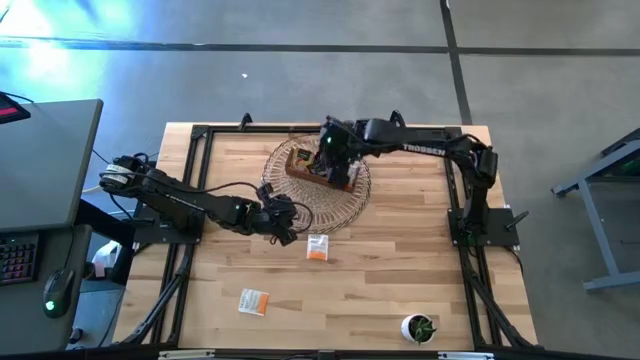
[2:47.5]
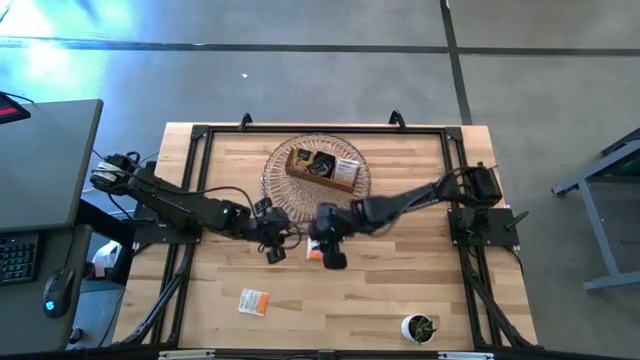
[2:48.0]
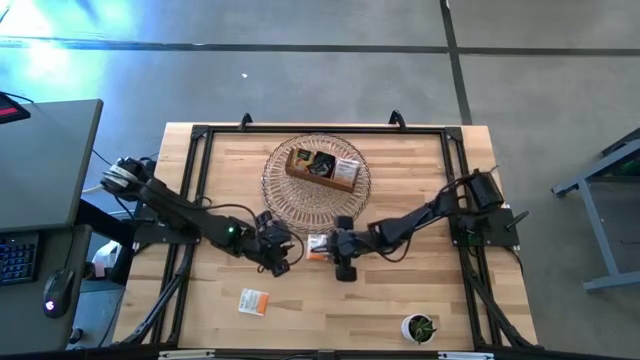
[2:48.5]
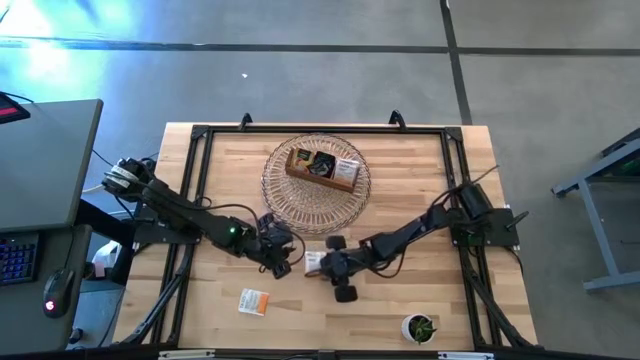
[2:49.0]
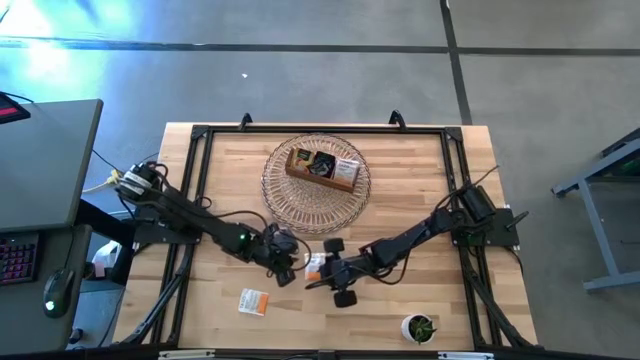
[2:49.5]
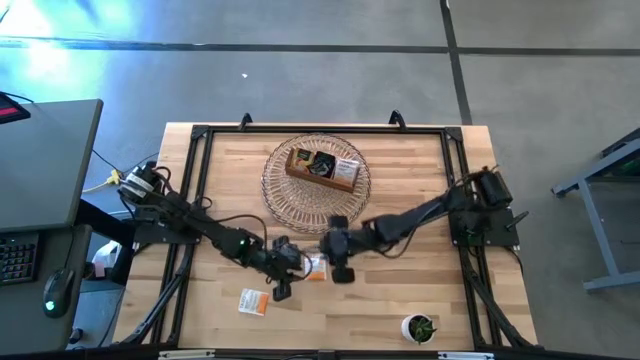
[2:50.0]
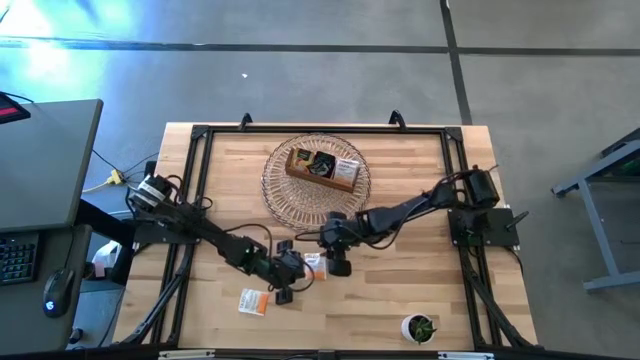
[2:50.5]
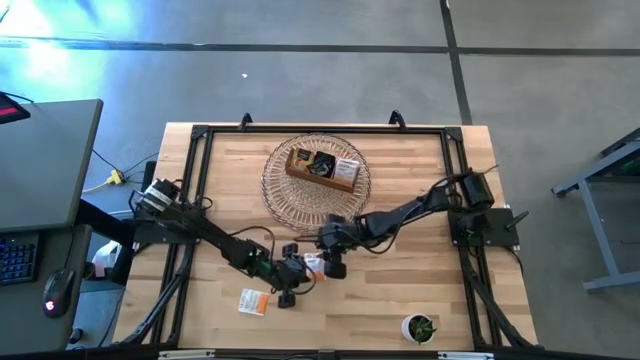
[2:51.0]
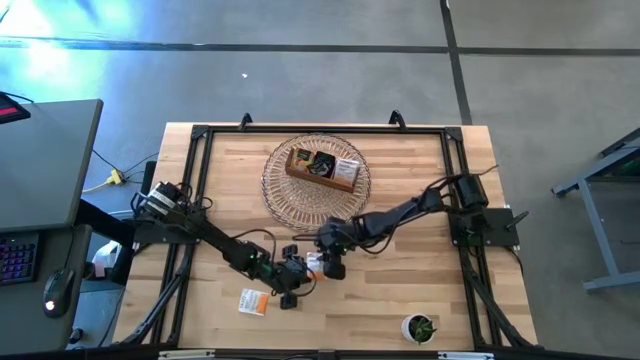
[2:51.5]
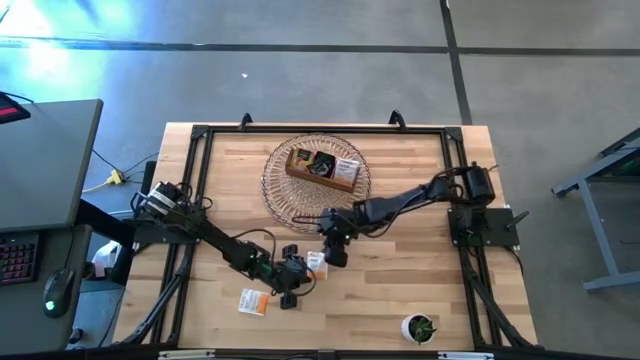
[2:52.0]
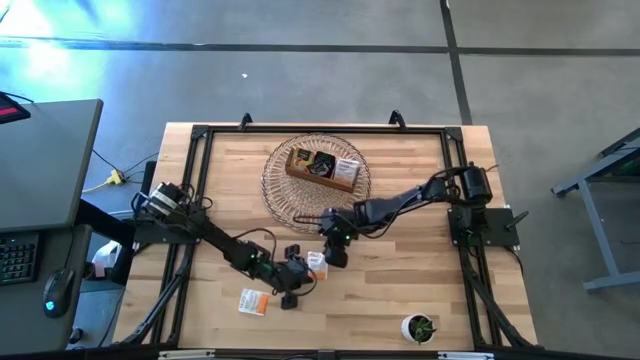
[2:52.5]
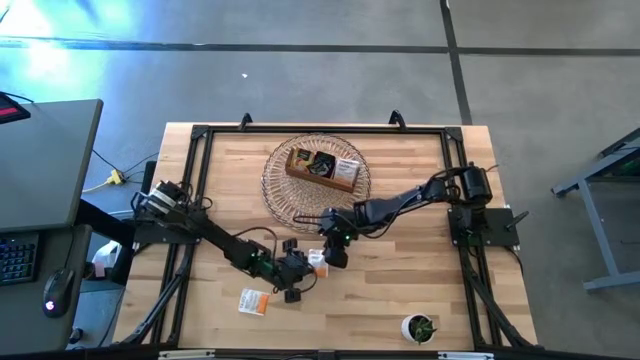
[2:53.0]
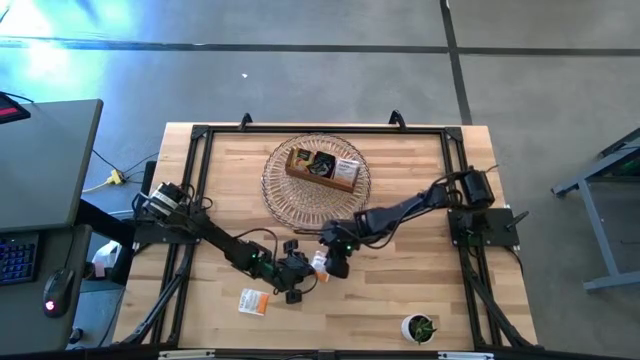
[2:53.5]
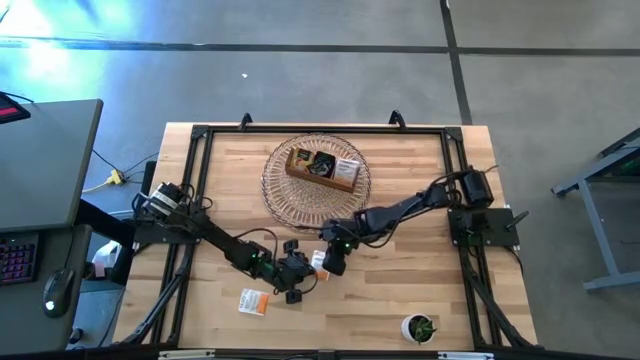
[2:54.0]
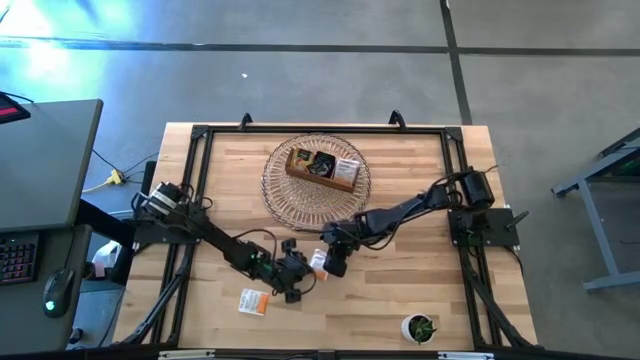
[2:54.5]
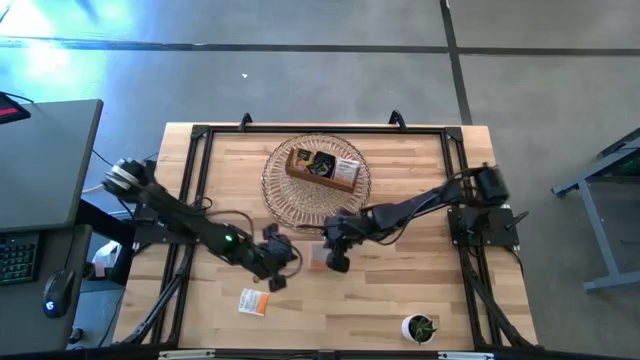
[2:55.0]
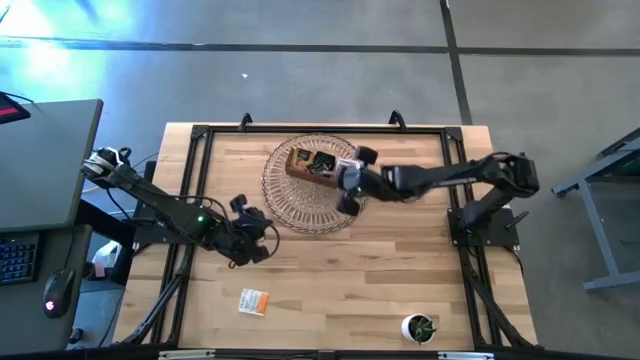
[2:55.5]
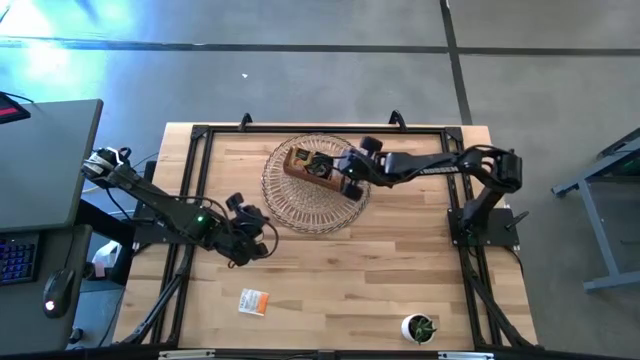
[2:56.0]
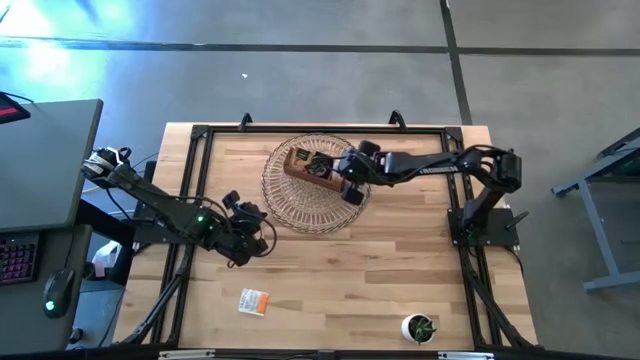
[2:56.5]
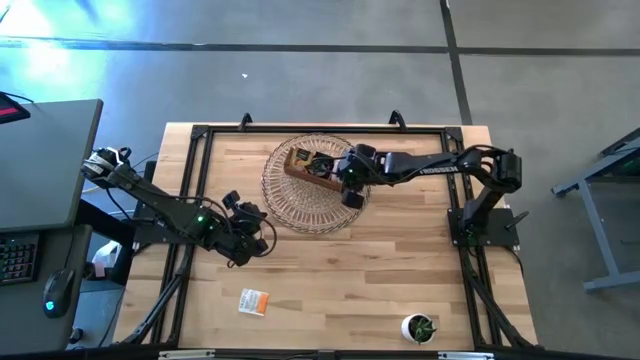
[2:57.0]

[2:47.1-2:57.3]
Task: Pick & Place Tea
Put the white tea bag into the right section of the wooden organizer

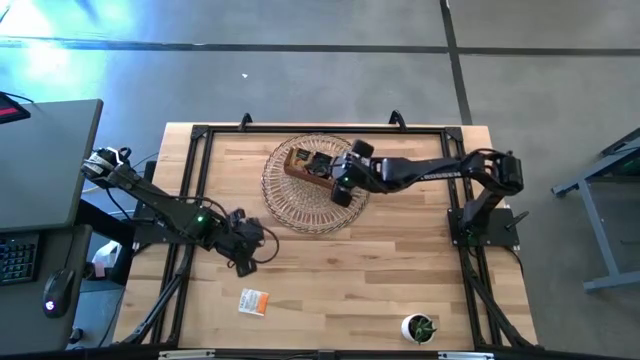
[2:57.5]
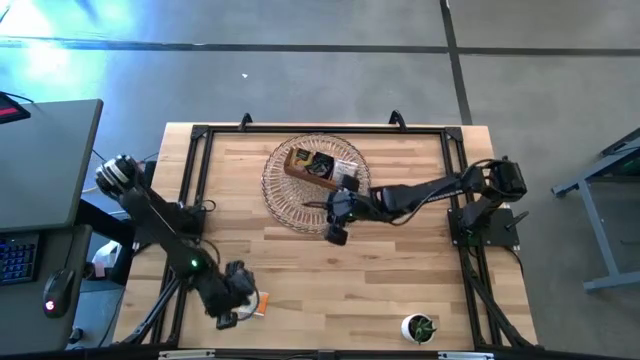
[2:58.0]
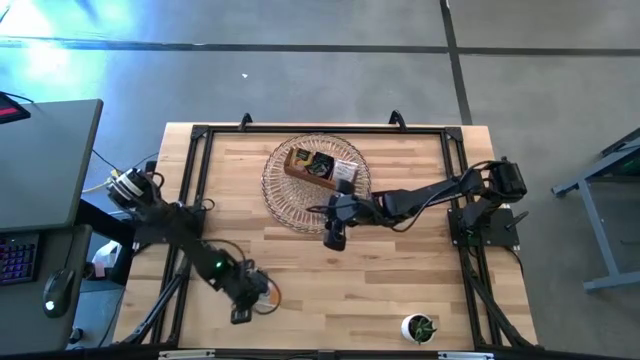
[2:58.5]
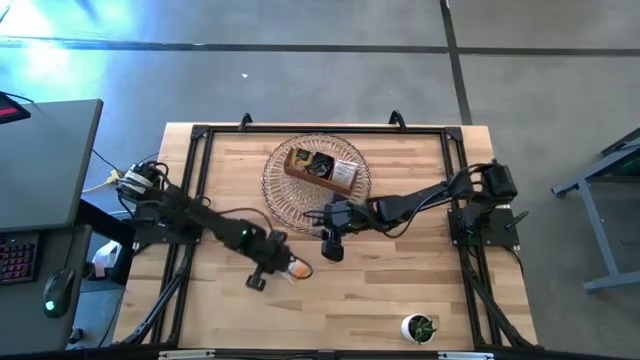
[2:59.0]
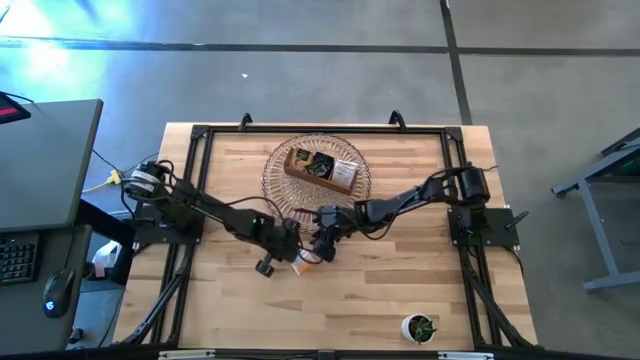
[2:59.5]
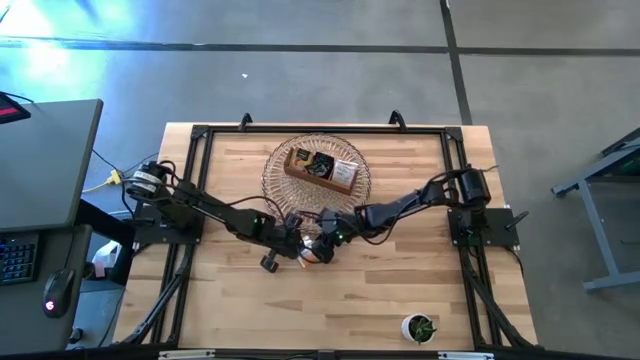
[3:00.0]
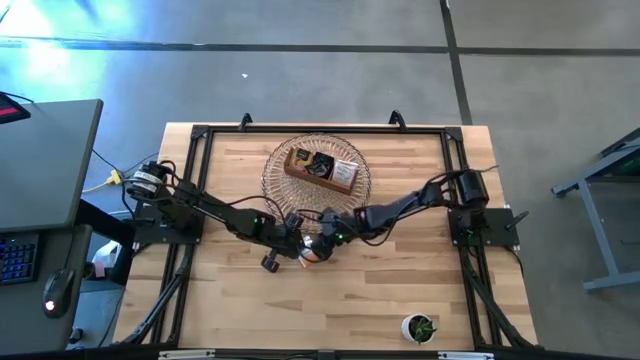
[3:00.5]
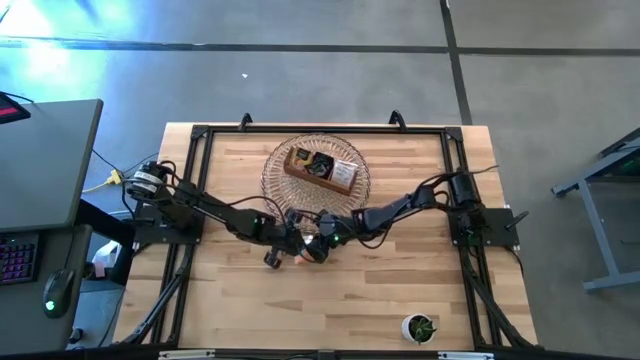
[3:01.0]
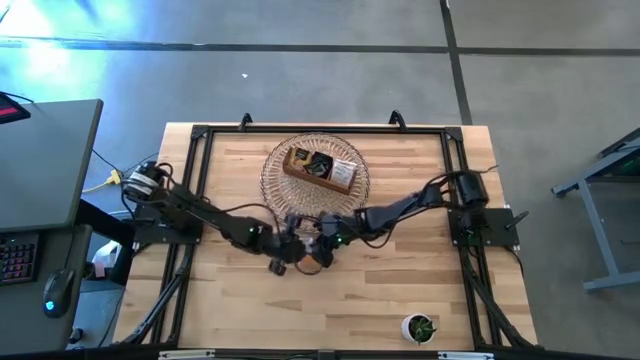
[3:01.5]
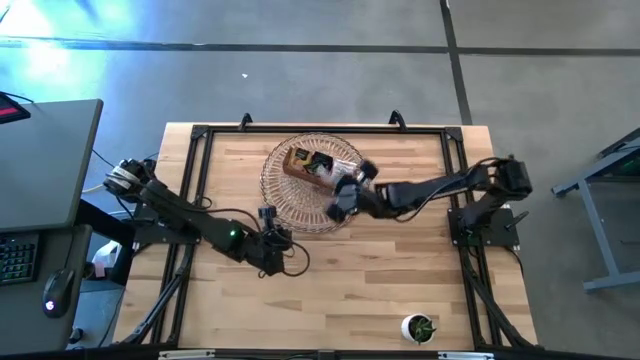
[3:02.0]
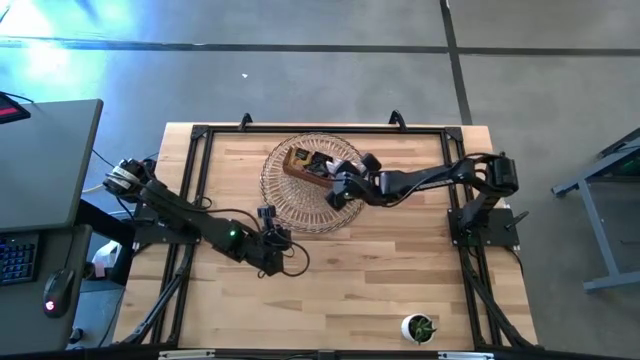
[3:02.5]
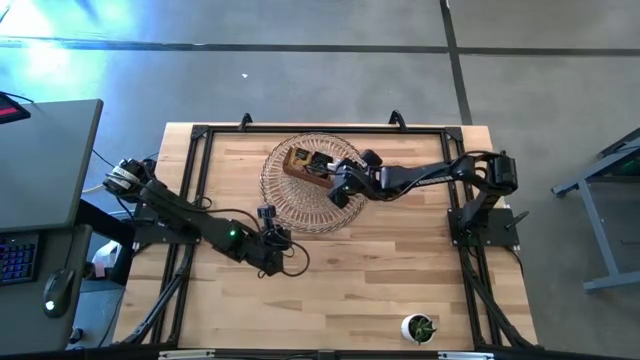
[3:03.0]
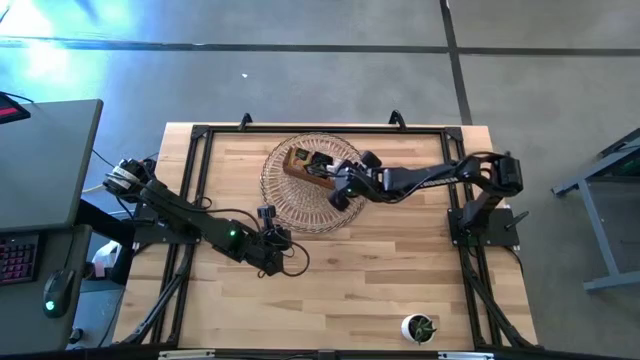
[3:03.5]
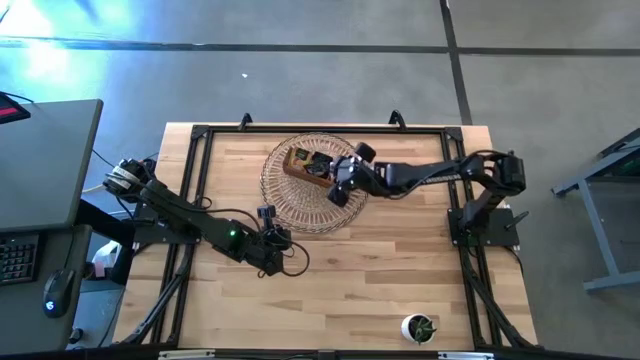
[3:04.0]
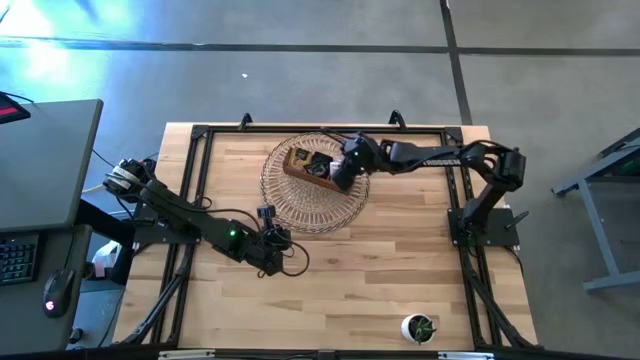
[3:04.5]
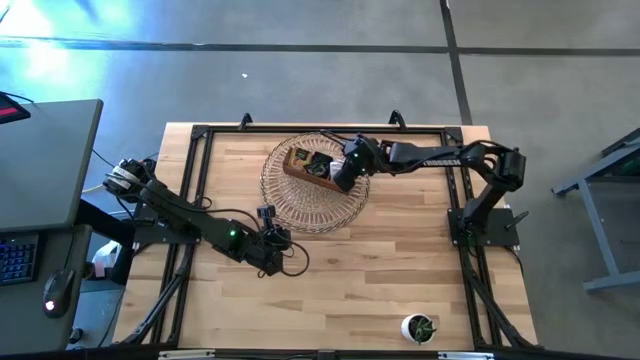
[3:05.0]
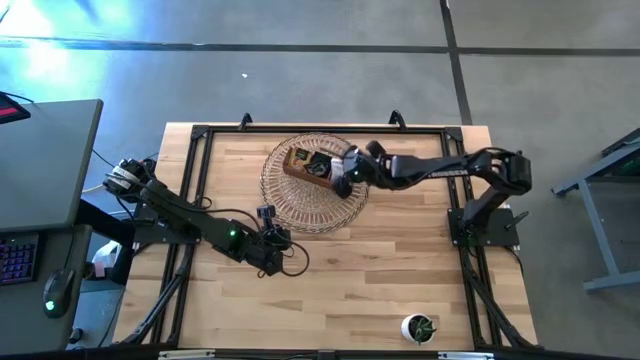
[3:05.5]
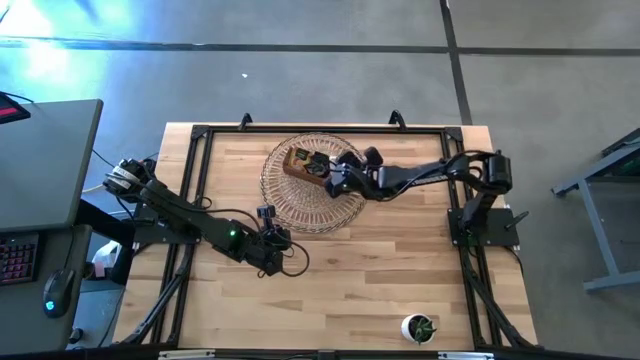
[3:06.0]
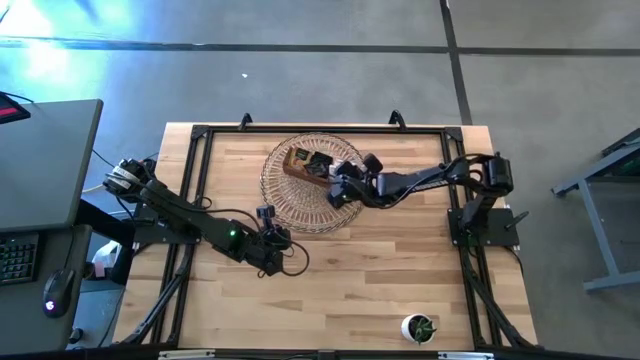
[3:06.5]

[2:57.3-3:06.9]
Put the white tea bag into the right section of the wooden organizer

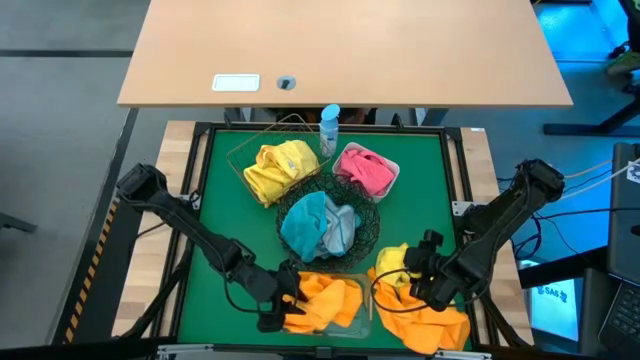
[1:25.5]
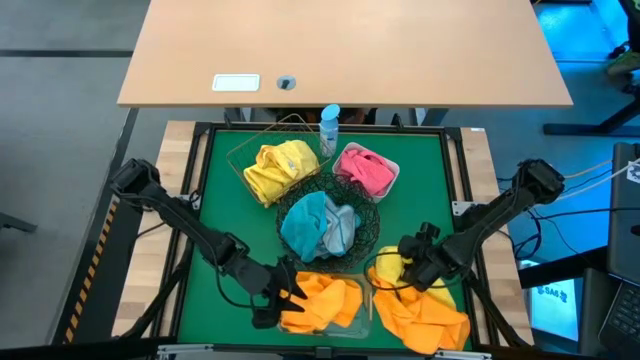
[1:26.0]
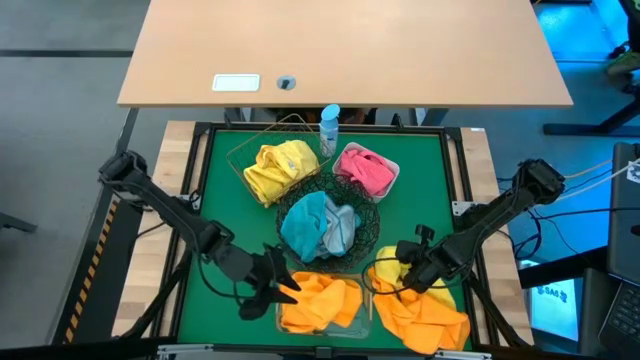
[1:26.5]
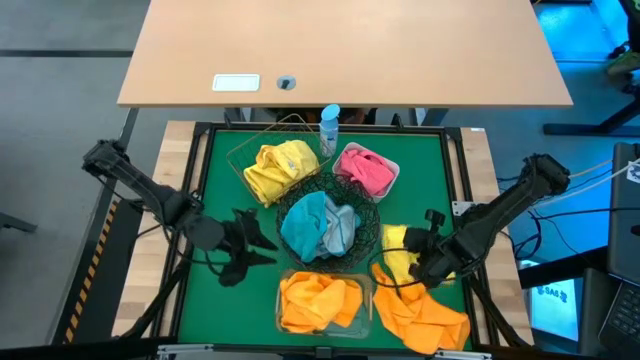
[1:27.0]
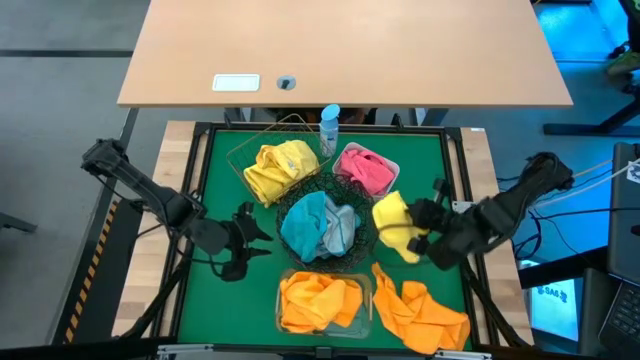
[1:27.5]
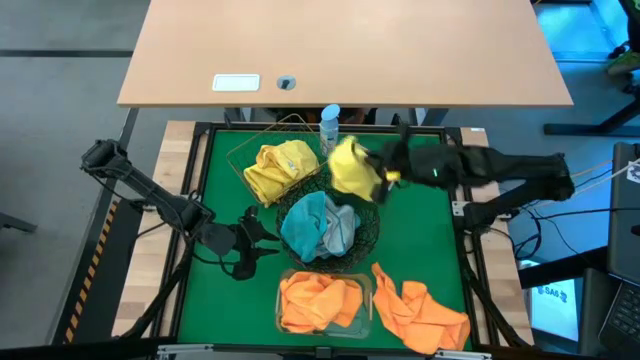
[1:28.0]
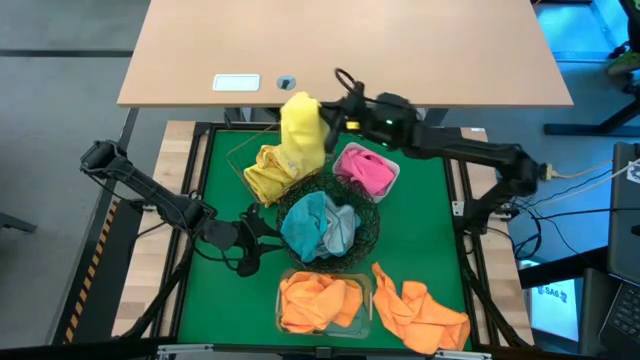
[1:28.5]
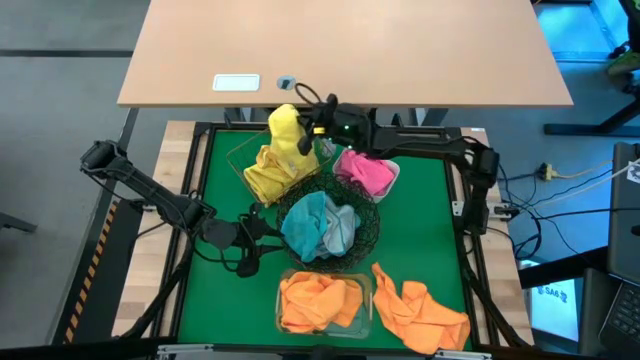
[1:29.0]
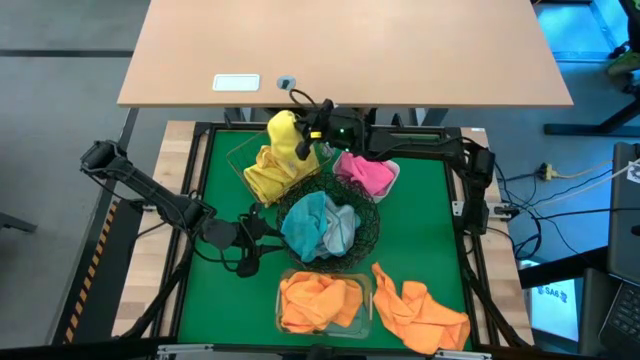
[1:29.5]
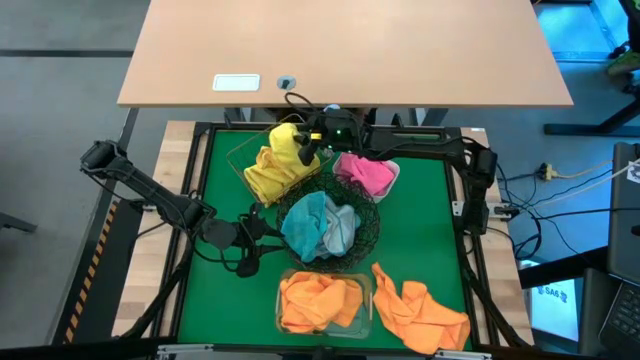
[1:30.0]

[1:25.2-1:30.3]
Task: Sort microfiber towel by color & place in baskets
Put the yellow microfiber towel into the brown wire basket
